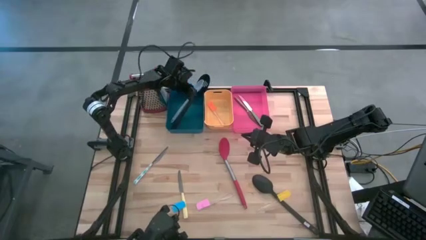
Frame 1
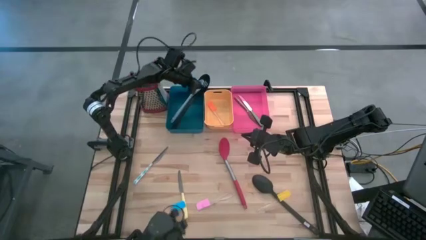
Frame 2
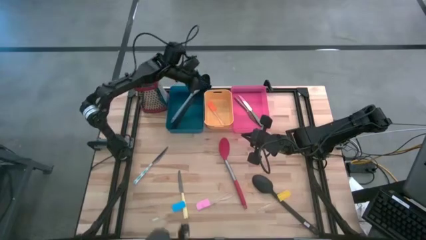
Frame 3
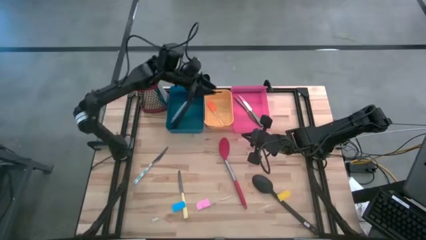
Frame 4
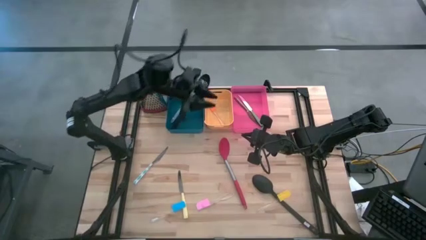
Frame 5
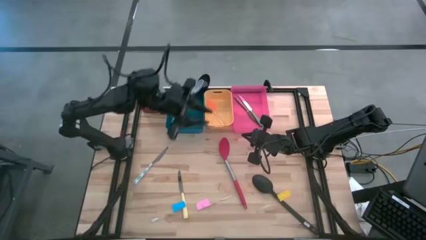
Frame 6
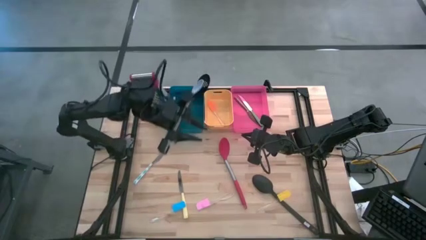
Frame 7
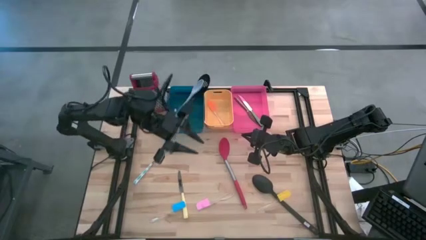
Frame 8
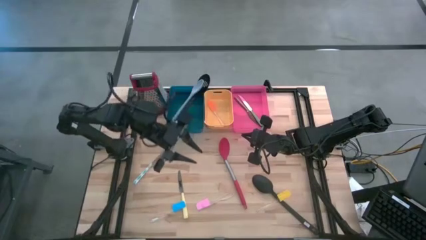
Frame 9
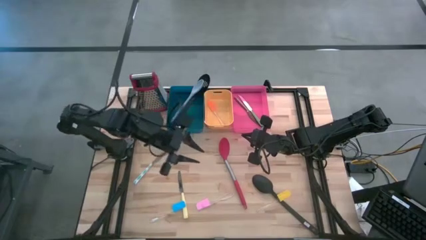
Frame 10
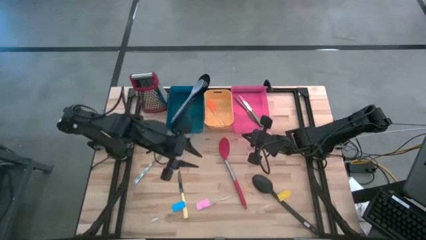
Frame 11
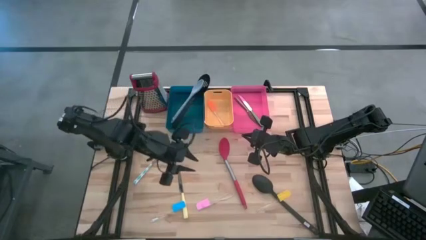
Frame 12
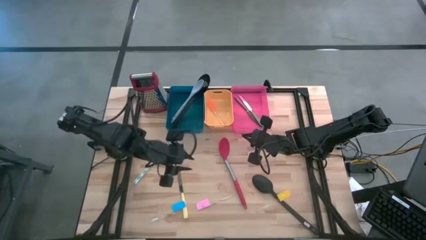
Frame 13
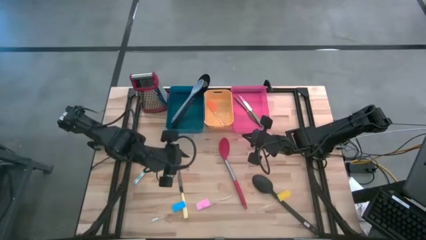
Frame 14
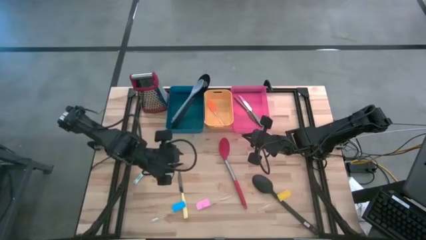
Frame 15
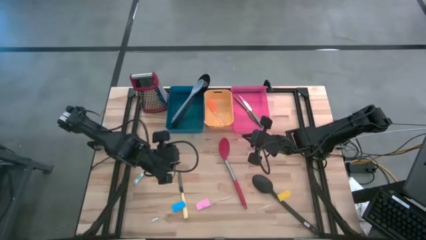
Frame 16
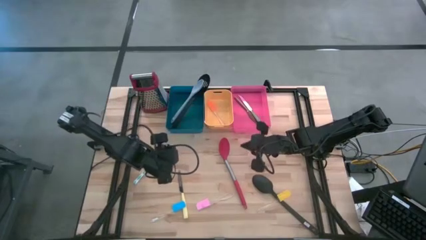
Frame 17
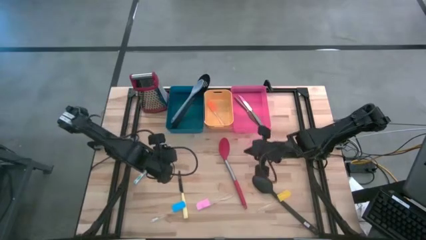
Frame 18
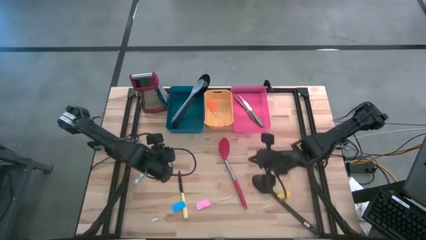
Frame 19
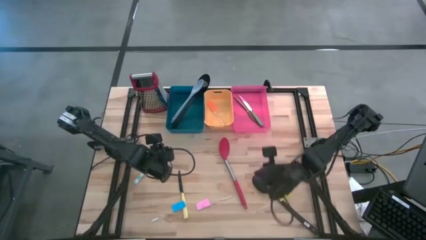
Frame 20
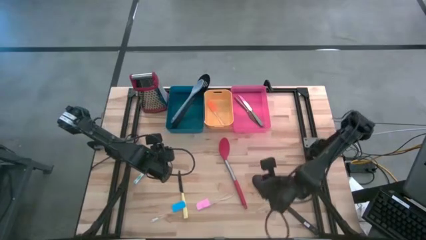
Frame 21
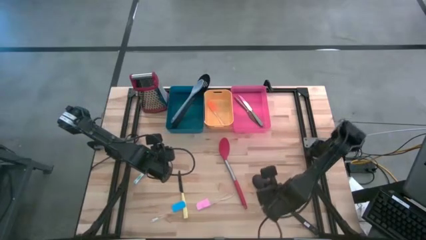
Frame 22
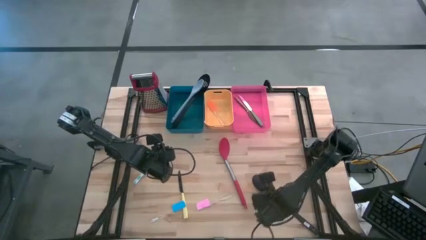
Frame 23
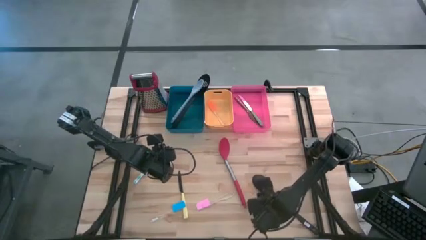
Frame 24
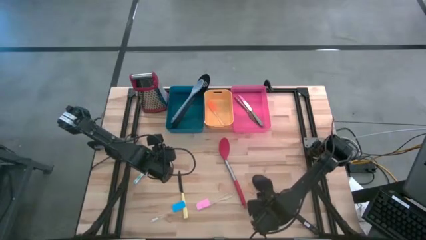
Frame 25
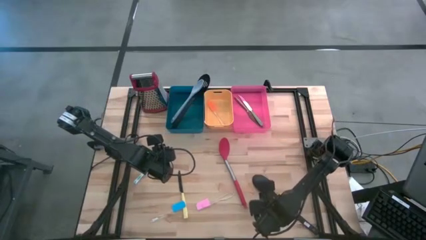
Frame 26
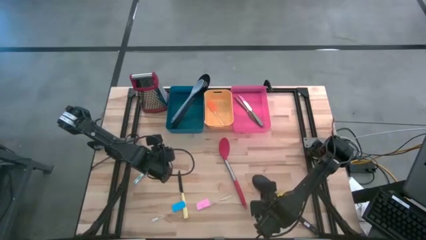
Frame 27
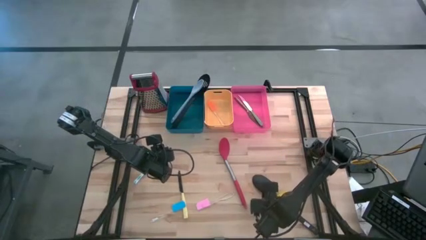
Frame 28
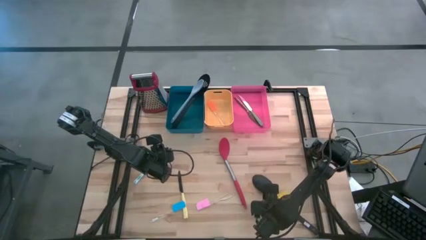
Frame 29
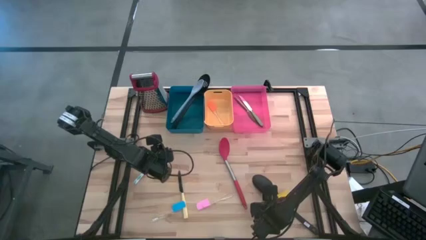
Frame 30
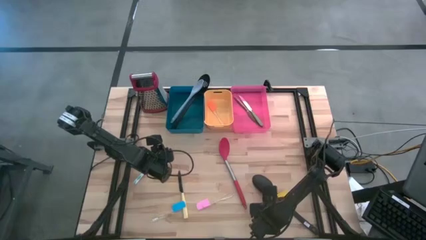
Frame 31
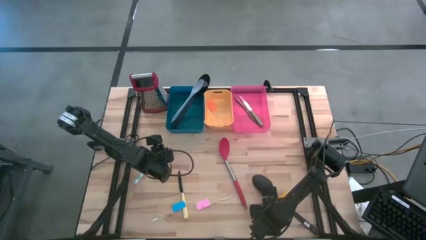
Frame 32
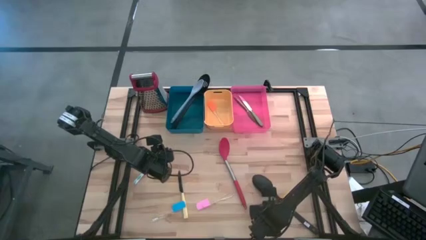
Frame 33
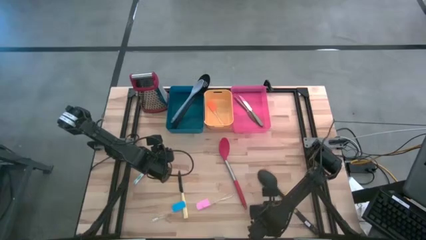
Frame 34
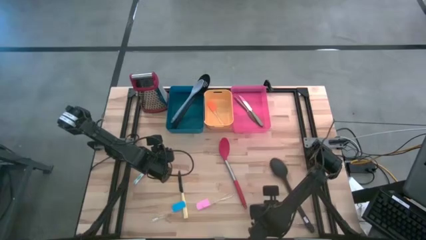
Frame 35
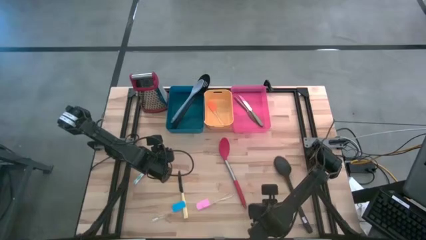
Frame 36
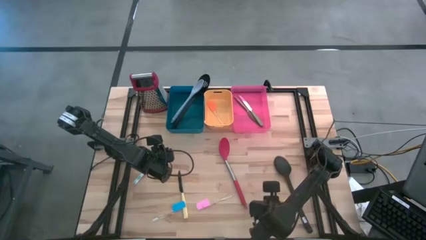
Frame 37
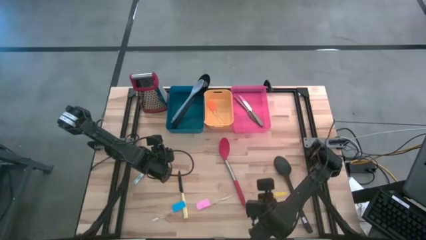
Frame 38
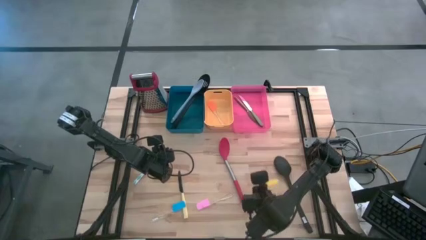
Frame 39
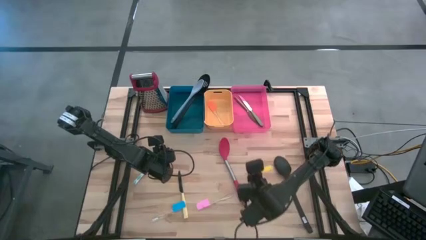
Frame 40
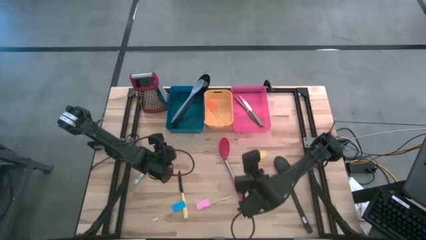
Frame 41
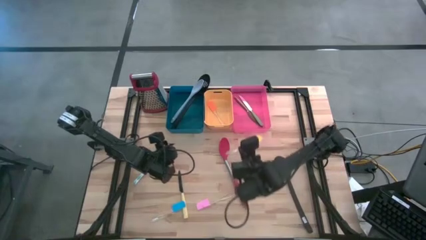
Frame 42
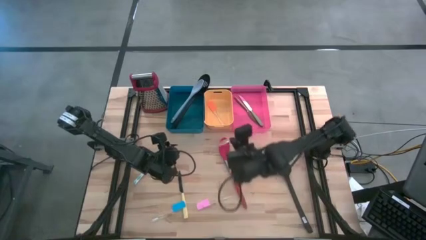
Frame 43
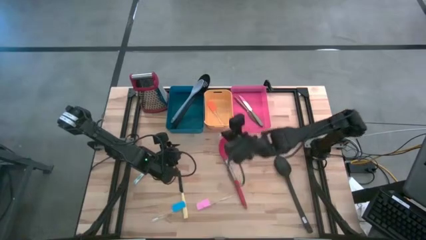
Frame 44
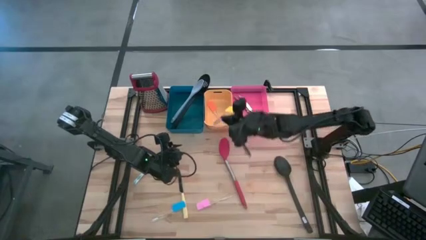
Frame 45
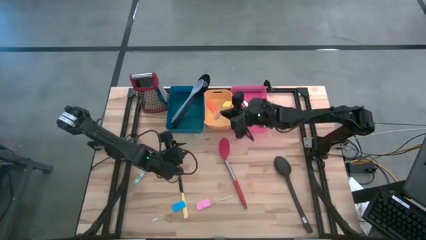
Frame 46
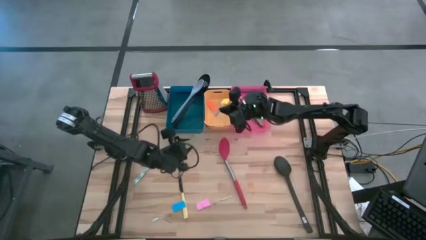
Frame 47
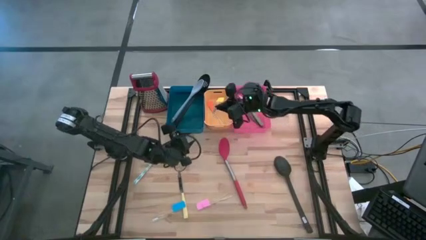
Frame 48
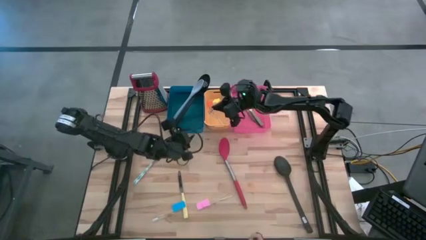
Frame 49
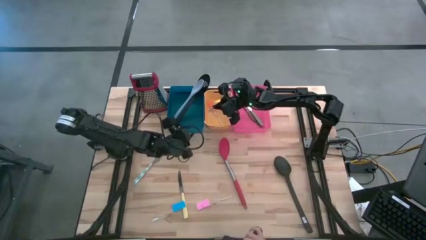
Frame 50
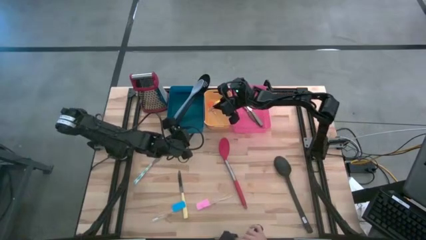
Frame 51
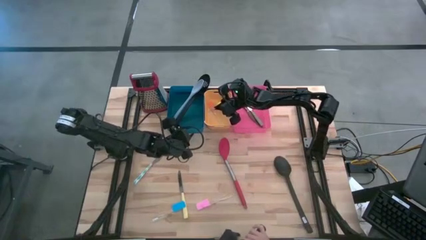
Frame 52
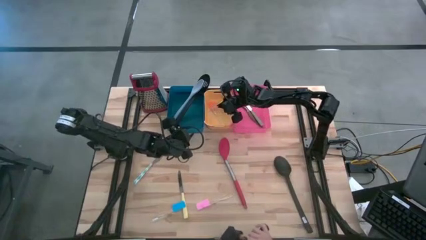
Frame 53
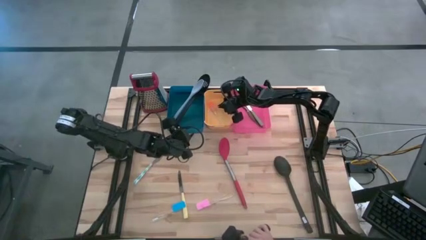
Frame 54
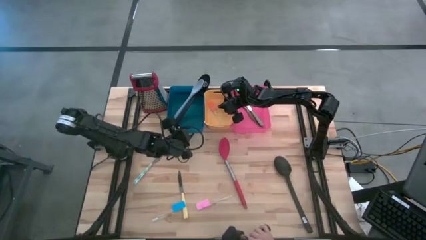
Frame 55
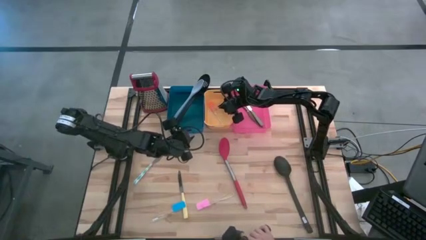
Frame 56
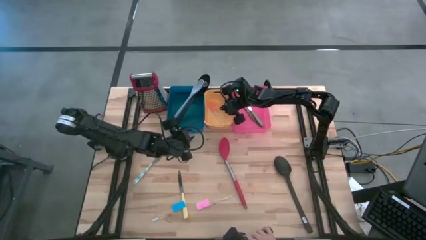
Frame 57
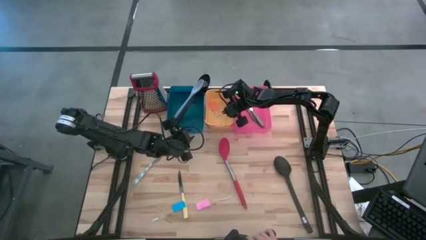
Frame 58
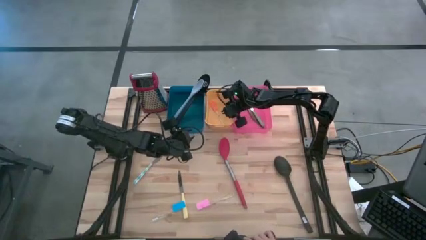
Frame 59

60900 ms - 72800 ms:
Task: Pick & Place Kitchen Items
Put the yellow spatula into the yellow bin

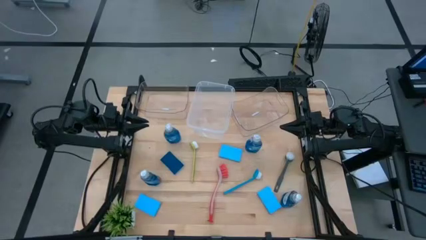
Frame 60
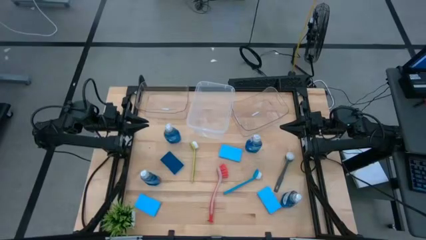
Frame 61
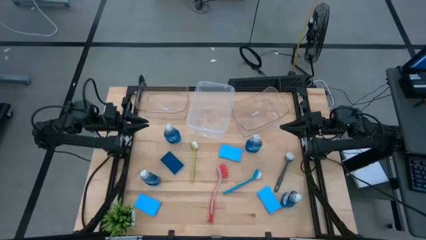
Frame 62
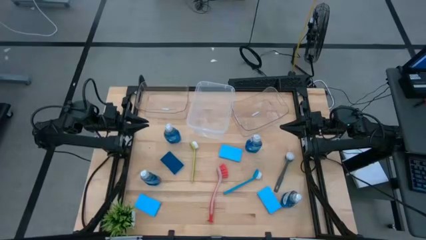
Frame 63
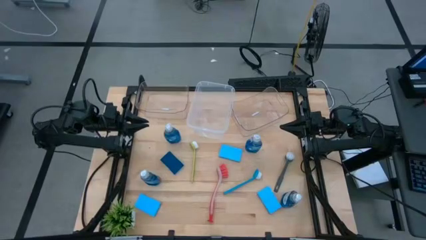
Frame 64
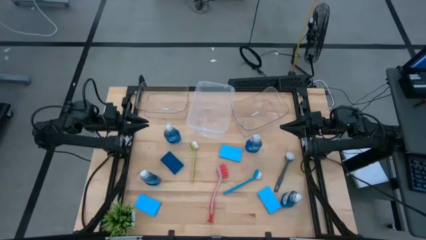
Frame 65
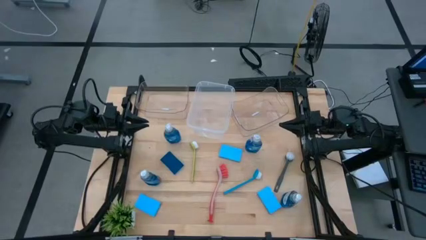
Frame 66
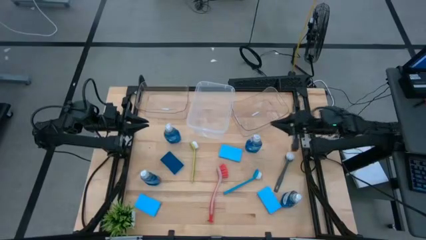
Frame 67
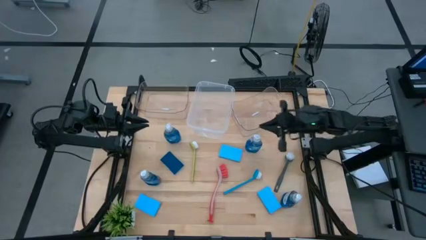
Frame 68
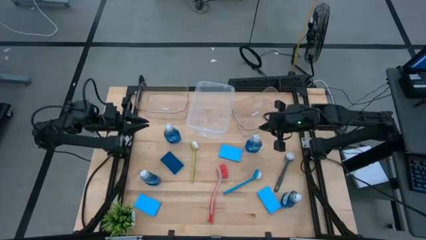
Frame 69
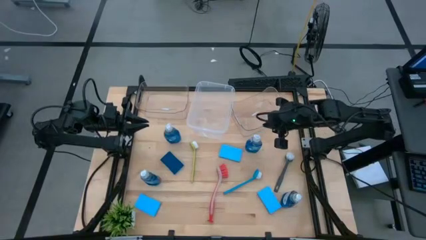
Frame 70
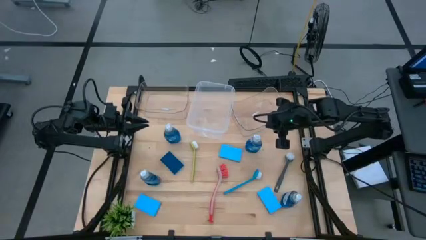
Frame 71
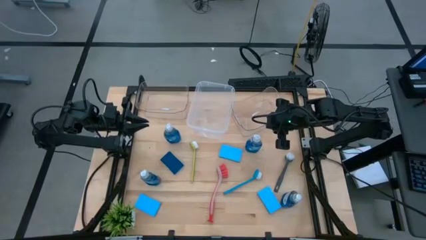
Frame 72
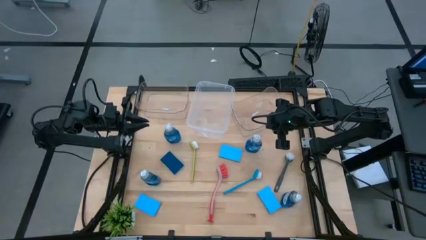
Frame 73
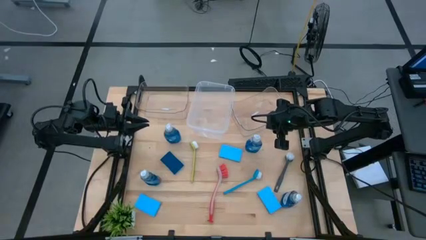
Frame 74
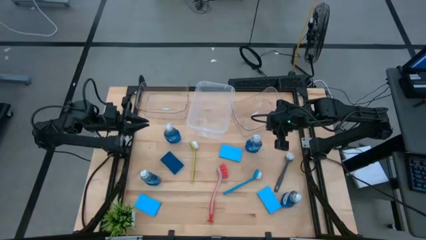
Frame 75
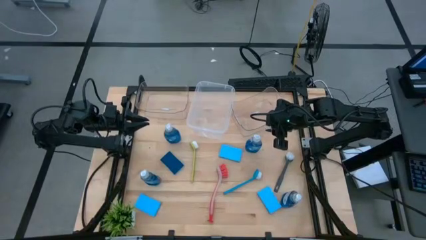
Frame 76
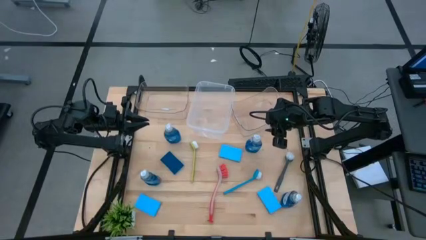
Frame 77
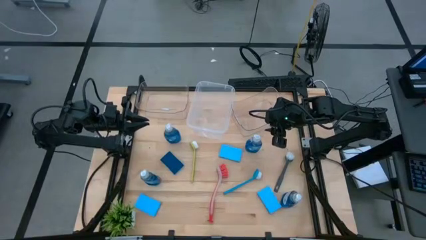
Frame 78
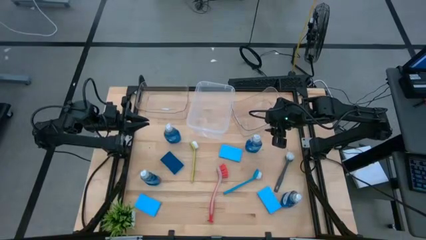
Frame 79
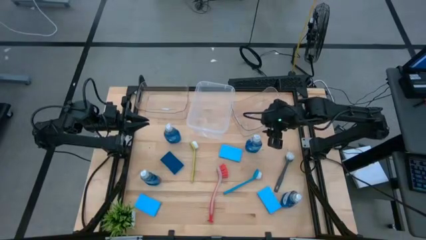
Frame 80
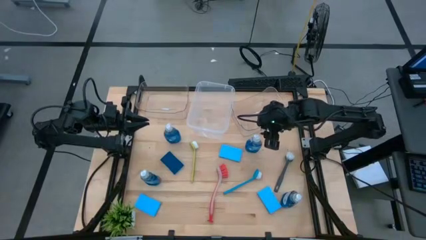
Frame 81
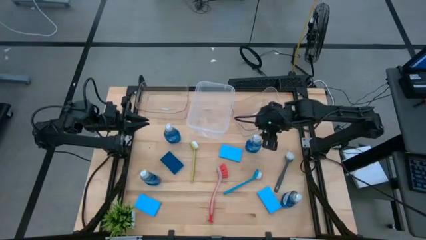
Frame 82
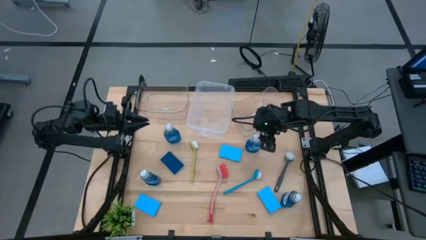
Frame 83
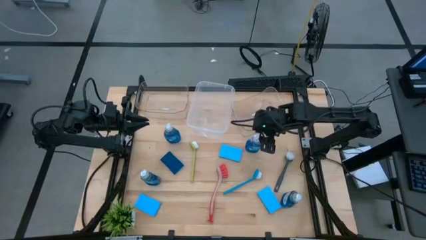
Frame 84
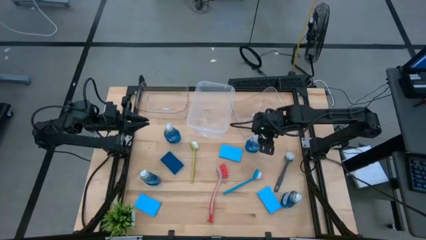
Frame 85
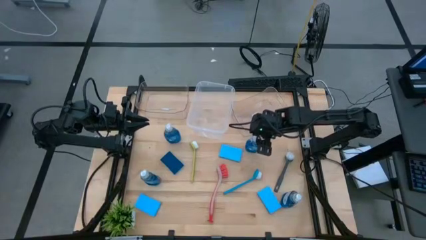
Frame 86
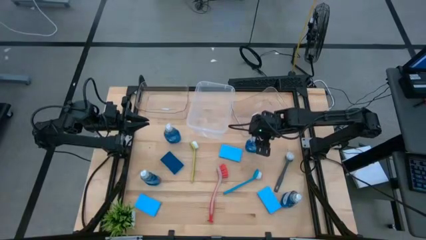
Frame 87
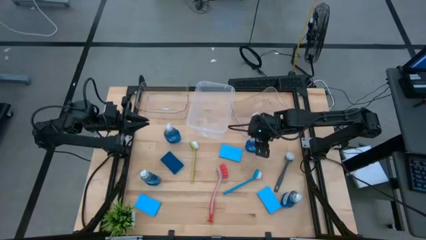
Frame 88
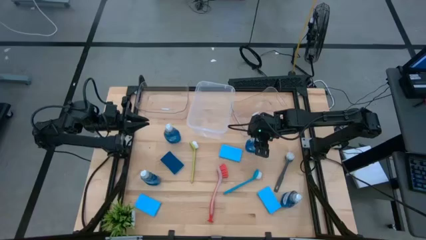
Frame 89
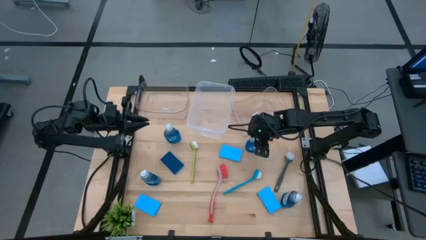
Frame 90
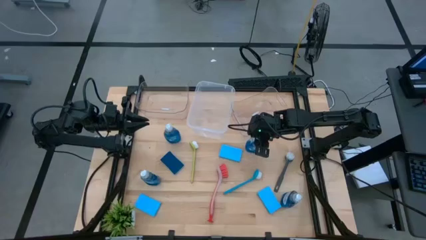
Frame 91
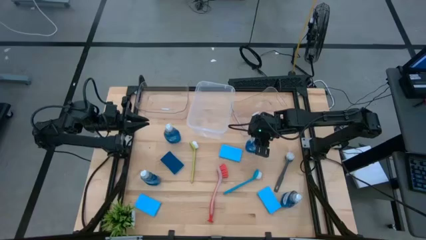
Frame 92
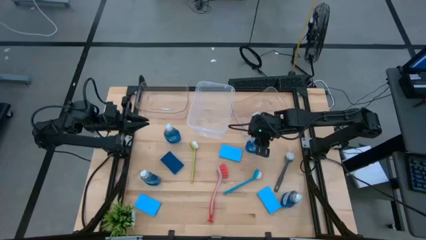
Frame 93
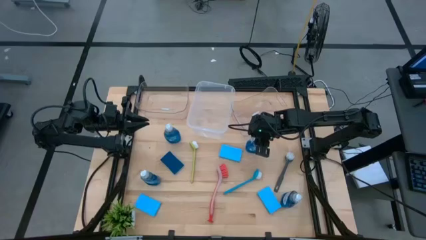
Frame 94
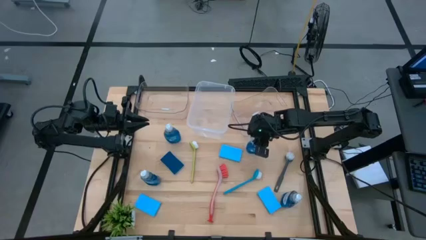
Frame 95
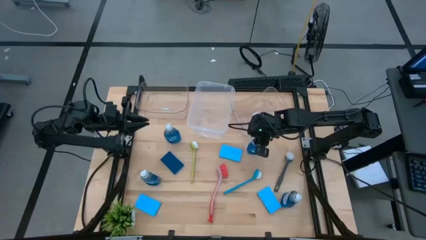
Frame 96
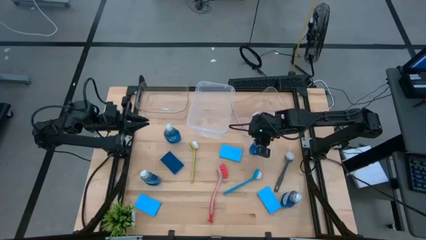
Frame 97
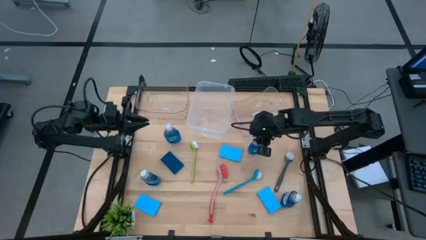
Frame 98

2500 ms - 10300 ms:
Task: Pick & Place Kitchen Sink Supplies
Put the dish soap into the left transparent bin
